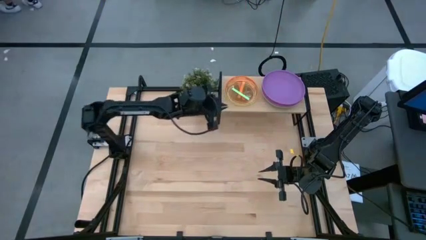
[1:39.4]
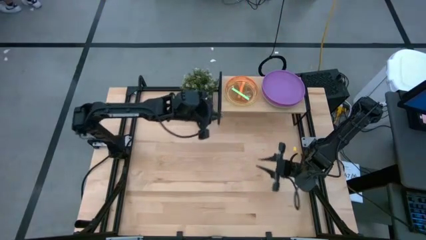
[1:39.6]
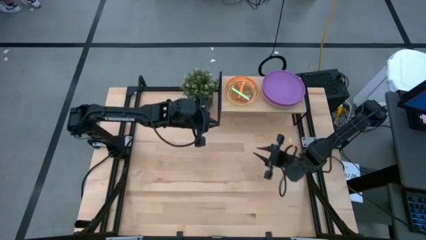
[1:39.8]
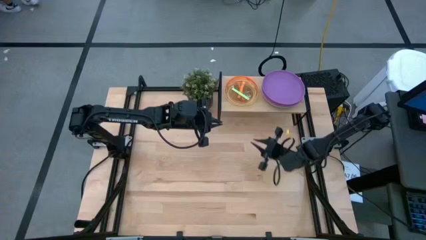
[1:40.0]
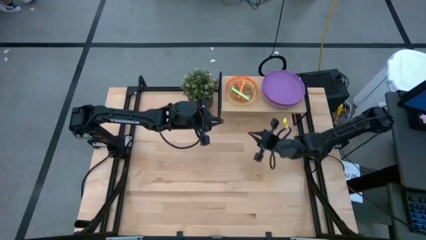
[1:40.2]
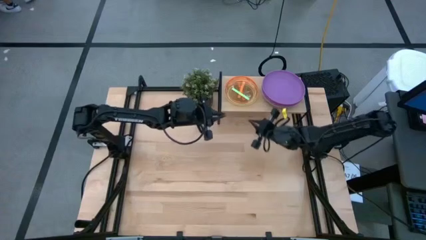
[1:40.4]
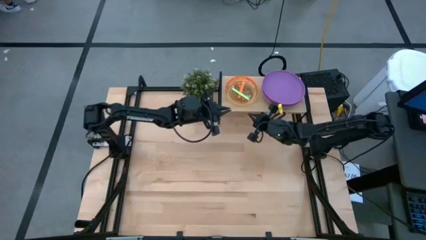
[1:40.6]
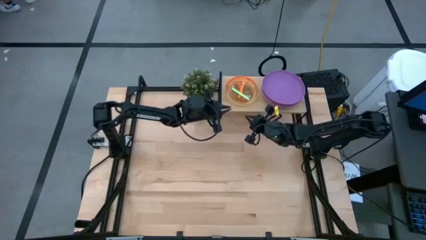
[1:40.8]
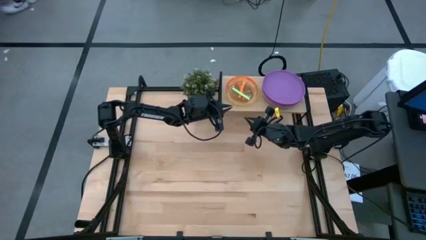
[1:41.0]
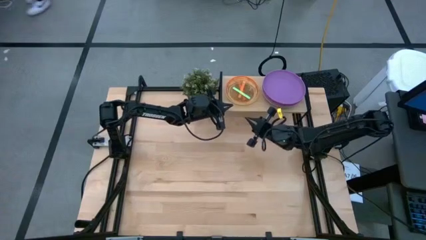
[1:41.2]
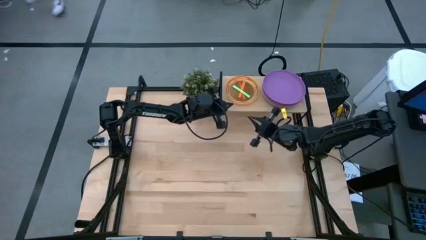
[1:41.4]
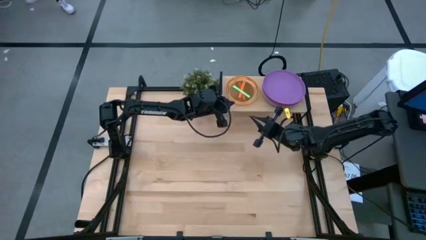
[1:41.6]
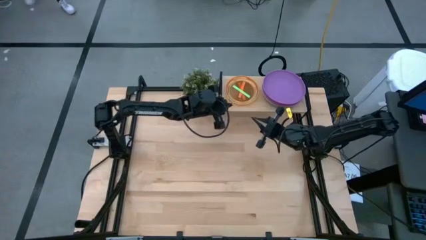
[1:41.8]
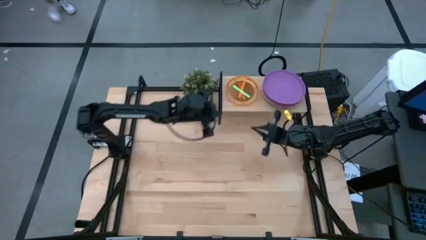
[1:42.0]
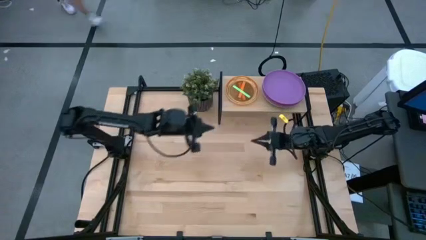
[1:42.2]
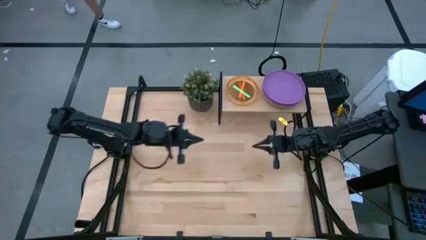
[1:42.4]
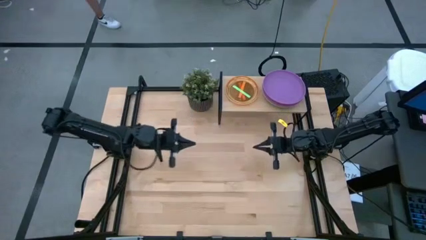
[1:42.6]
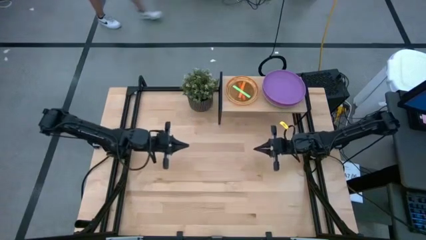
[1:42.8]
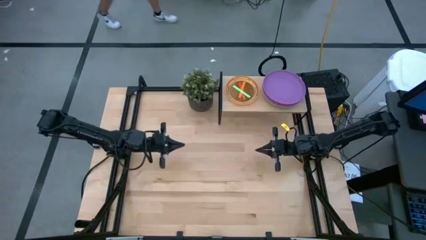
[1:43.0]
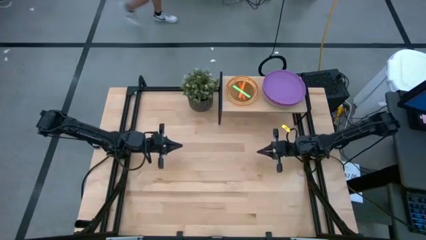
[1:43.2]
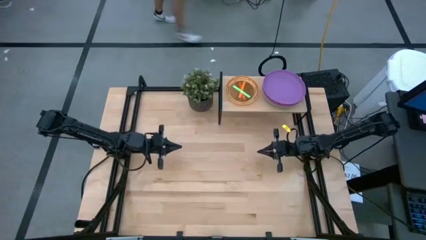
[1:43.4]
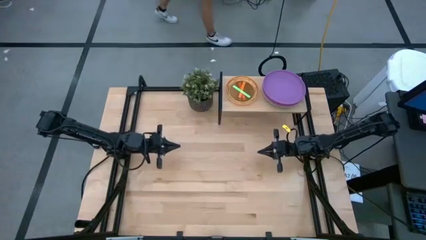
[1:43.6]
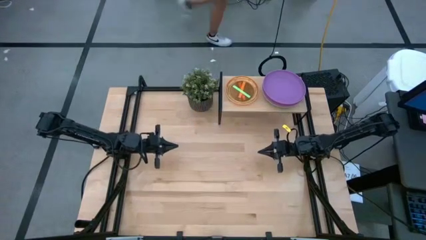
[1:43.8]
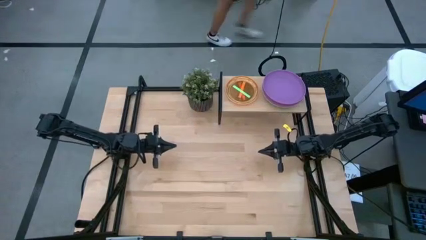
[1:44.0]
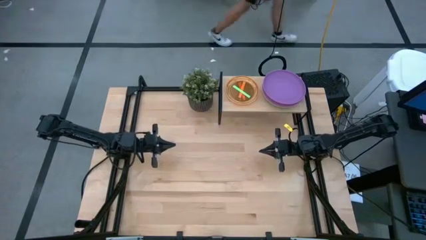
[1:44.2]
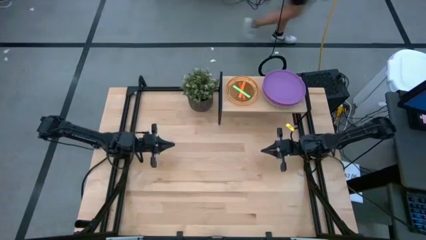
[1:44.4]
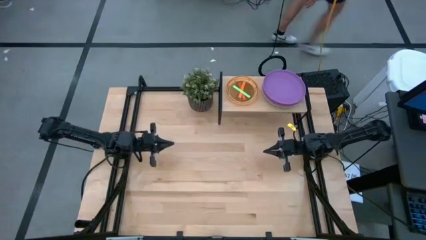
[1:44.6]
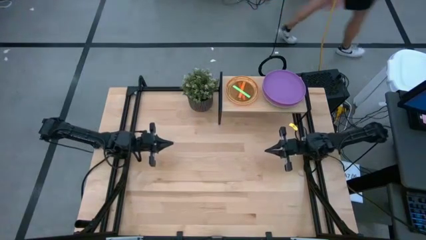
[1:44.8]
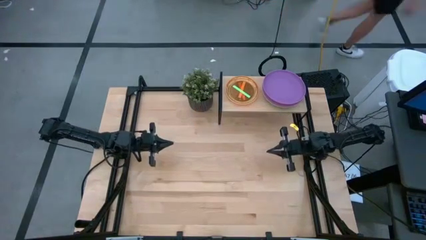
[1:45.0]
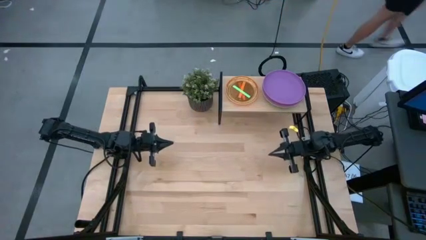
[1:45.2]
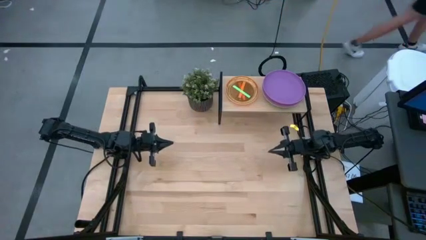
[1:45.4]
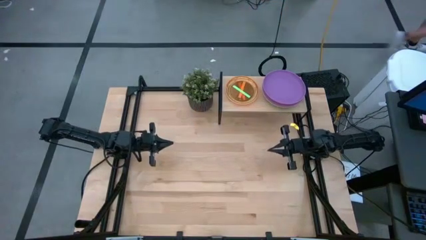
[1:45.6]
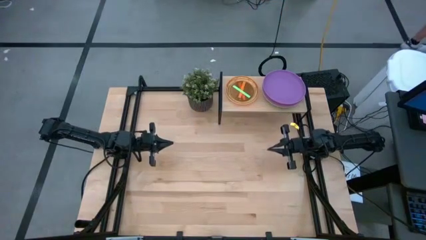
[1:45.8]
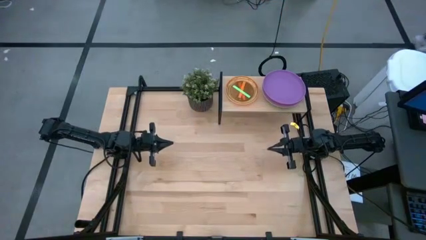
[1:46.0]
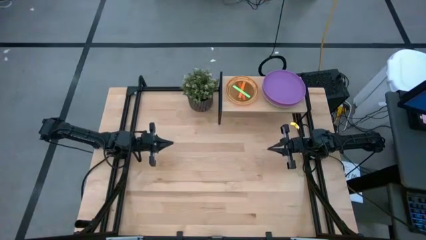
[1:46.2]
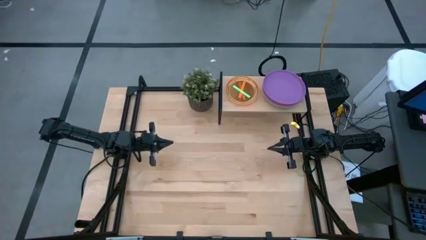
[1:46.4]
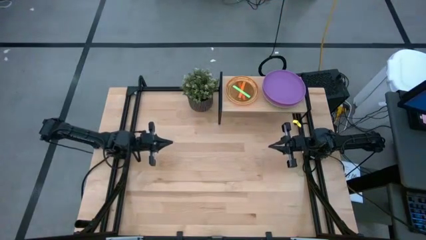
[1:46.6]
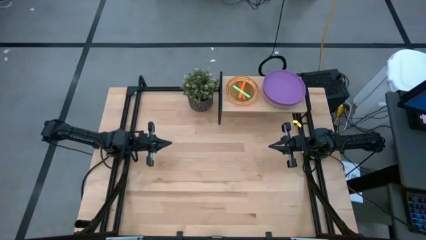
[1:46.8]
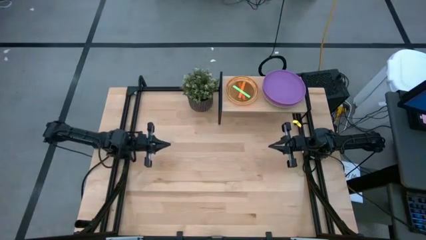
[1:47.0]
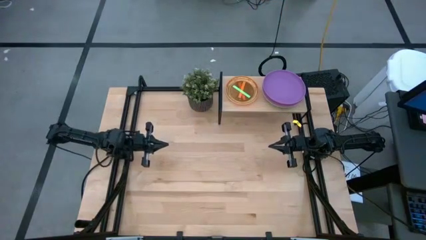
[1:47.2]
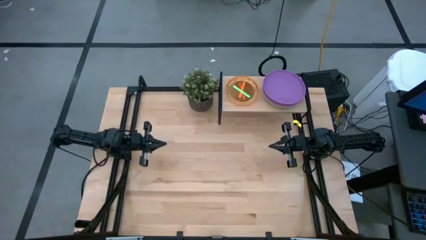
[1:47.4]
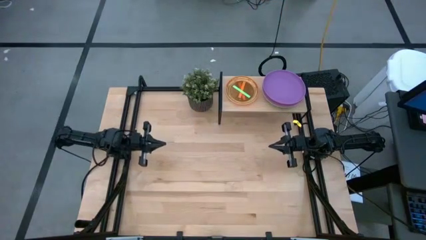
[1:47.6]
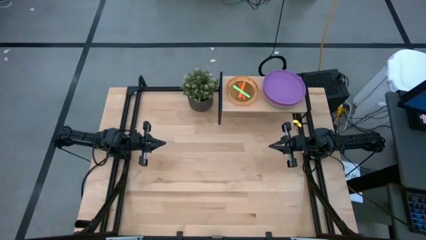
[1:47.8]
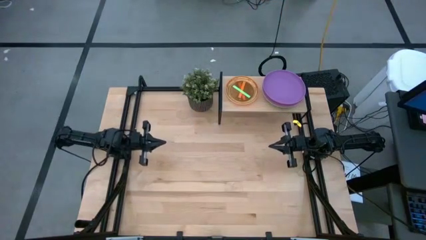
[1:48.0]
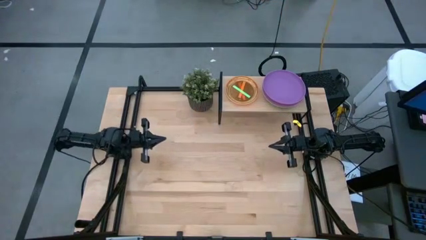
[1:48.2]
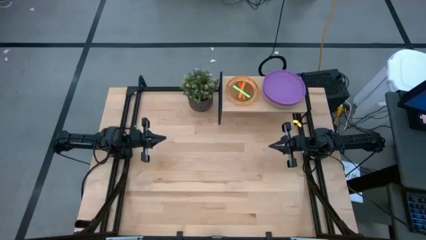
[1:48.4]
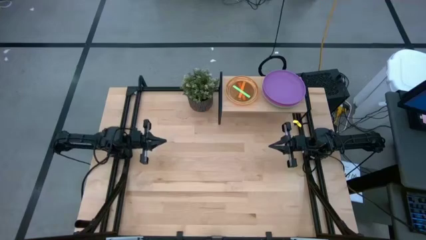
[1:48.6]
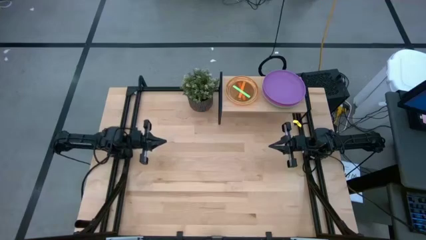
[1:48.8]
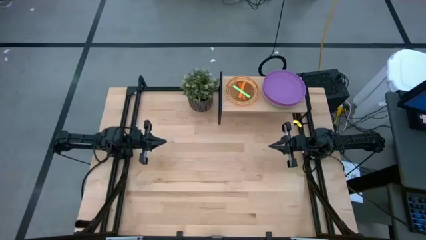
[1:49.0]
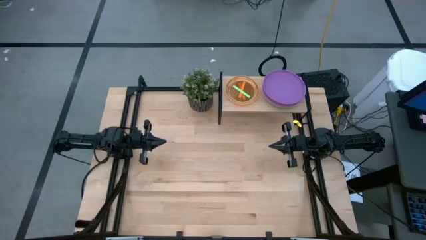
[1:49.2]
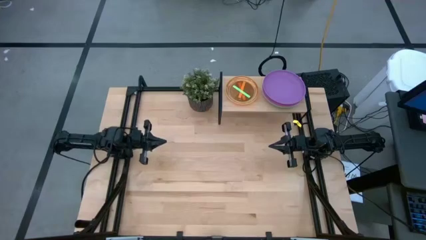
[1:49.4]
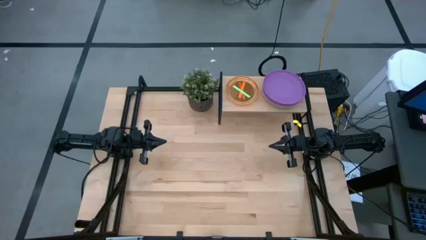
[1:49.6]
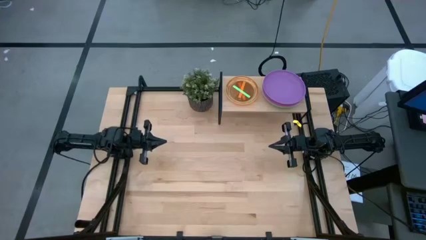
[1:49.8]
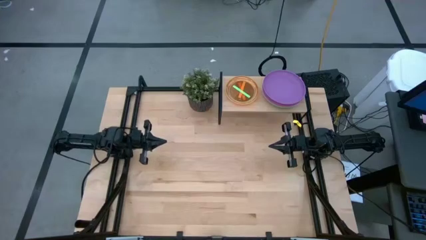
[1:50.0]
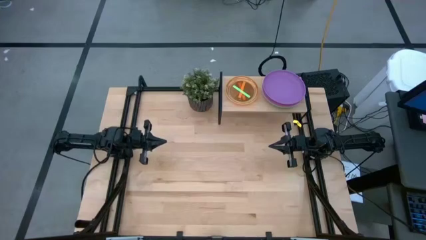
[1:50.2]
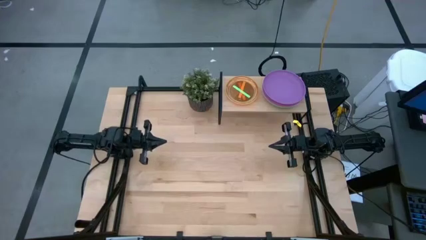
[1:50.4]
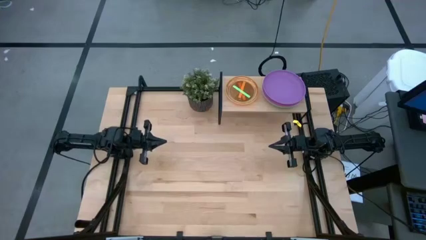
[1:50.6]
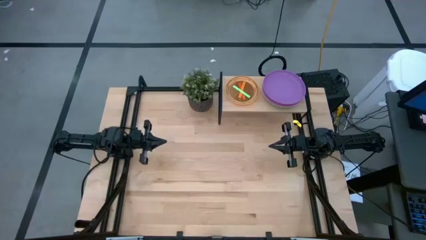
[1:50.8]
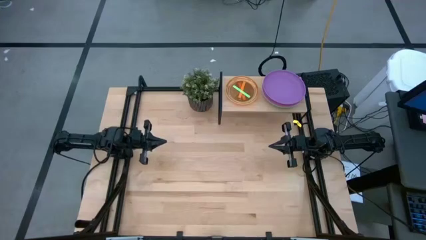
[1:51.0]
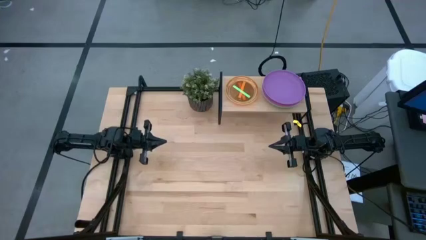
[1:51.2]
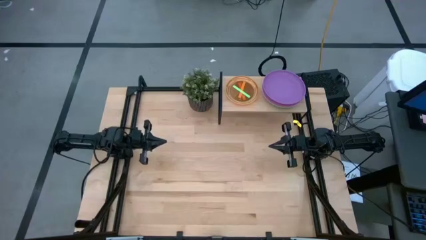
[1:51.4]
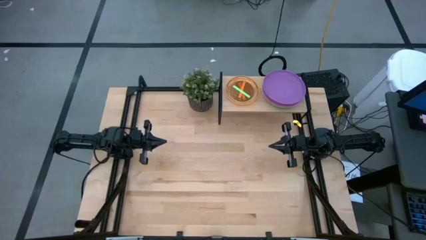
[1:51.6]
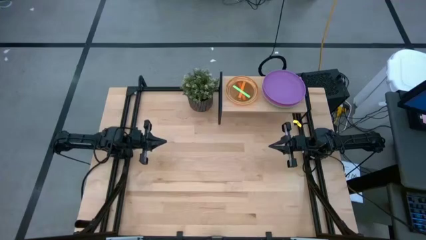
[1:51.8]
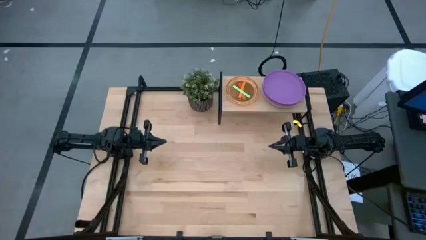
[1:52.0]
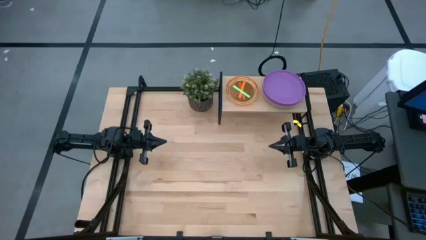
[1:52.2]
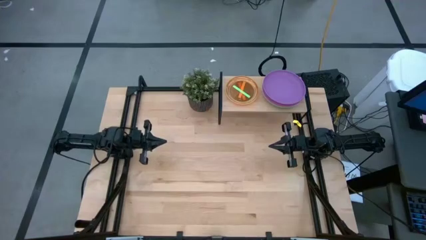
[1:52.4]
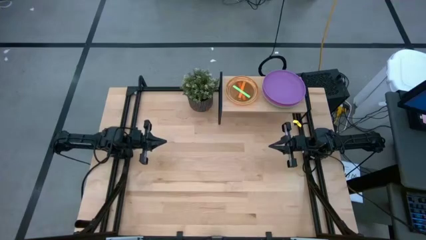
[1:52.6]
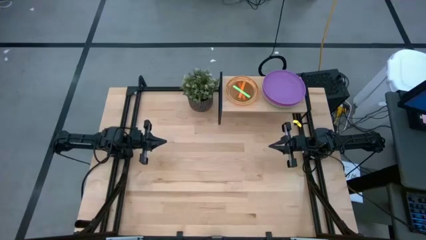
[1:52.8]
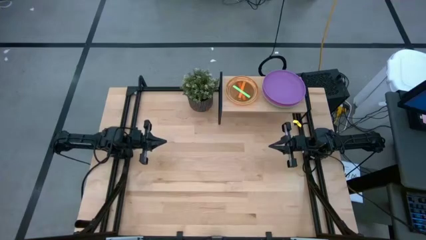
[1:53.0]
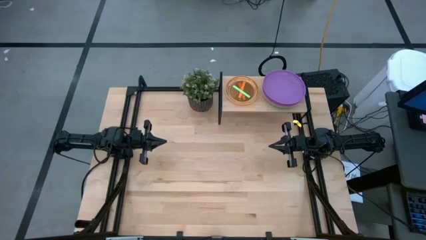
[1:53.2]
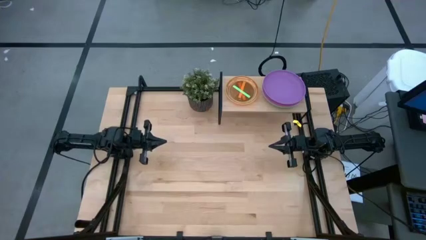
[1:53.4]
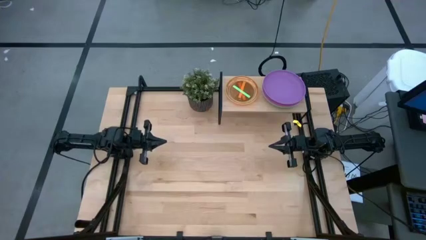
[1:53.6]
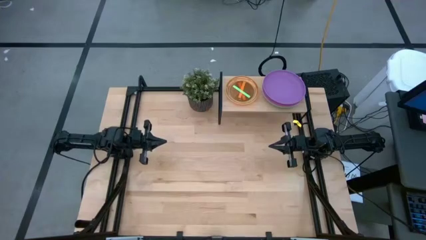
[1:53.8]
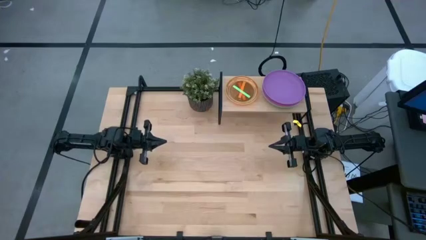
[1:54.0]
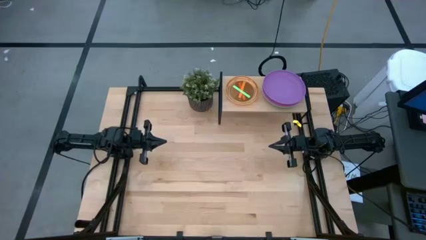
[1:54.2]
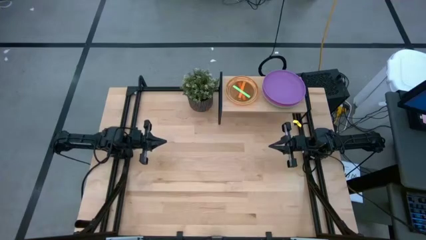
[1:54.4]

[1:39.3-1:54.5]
Task: Place and stack plates onto a shelf
Return to Home Position

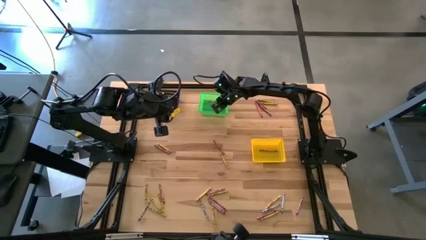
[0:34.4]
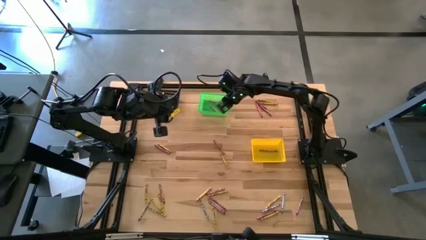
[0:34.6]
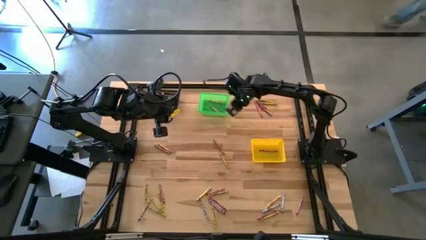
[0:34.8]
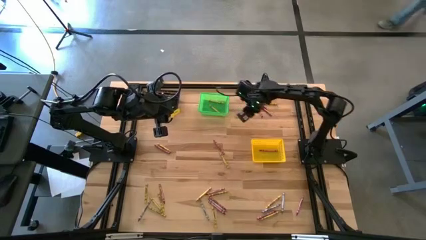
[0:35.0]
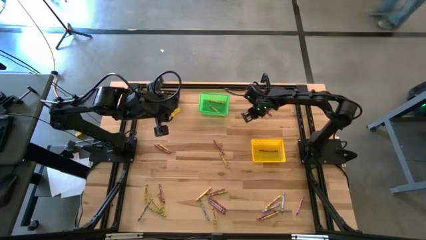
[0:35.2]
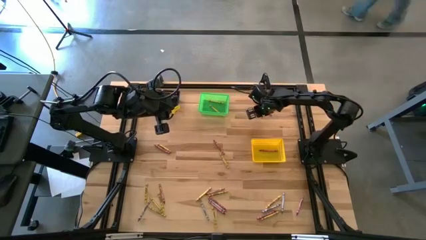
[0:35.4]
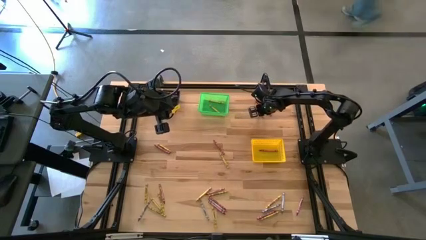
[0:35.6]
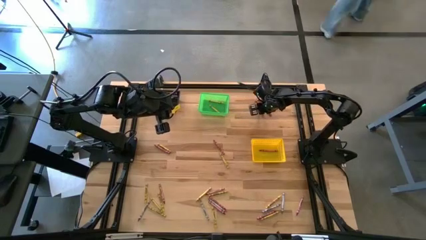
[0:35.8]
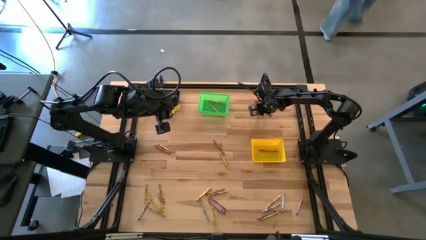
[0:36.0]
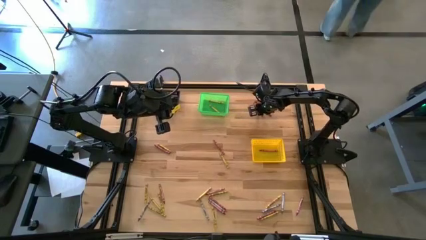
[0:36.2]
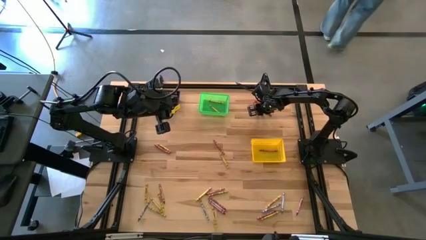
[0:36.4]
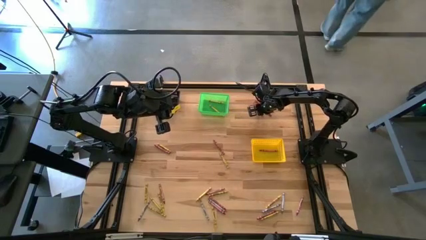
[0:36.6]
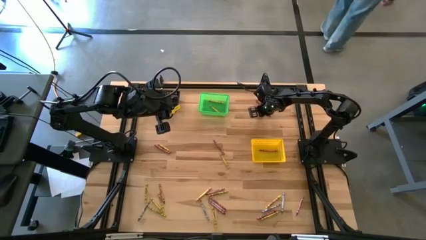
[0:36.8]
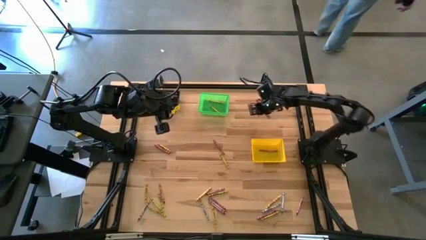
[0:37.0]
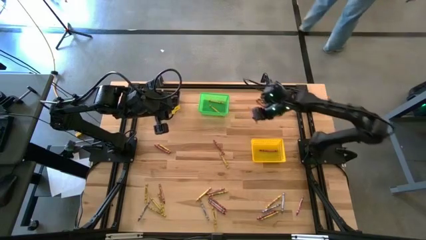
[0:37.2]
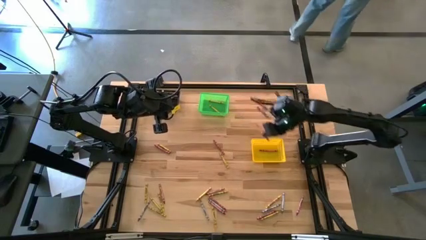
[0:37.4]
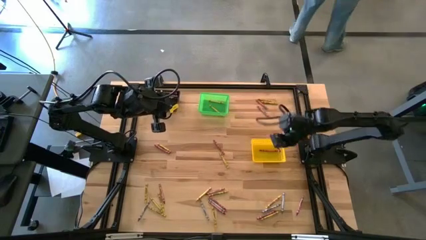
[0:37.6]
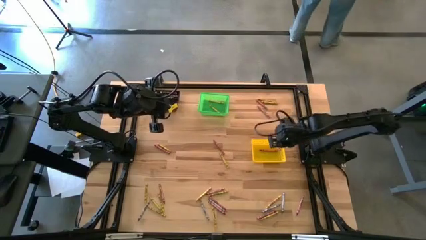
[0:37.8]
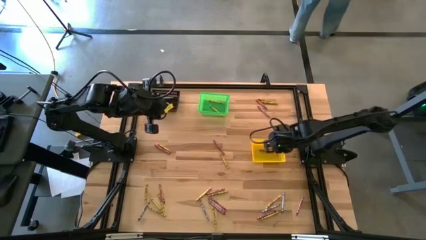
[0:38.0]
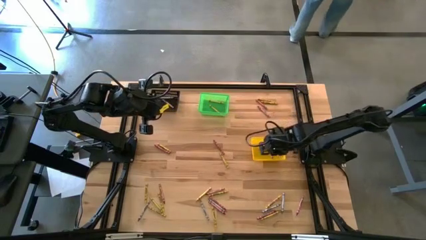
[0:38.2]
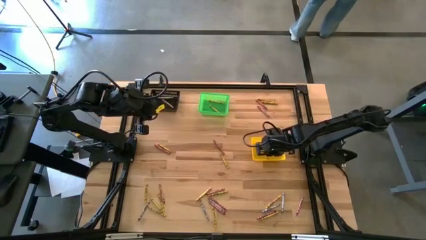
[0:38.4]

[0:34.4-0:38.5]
Task: Sort crayons
Put the red crayon into the yellow basket
